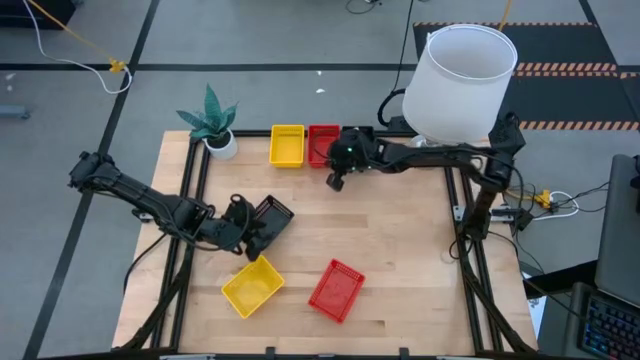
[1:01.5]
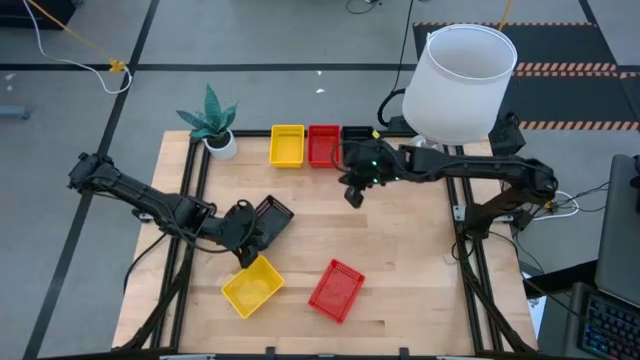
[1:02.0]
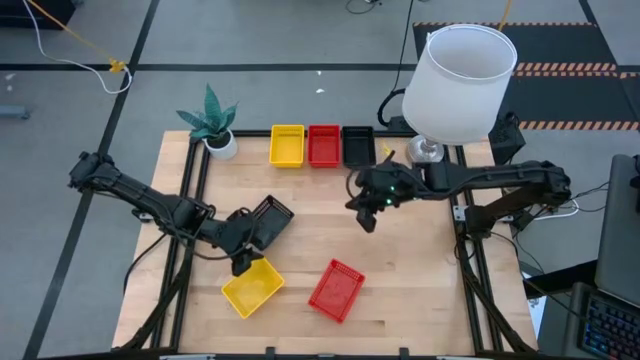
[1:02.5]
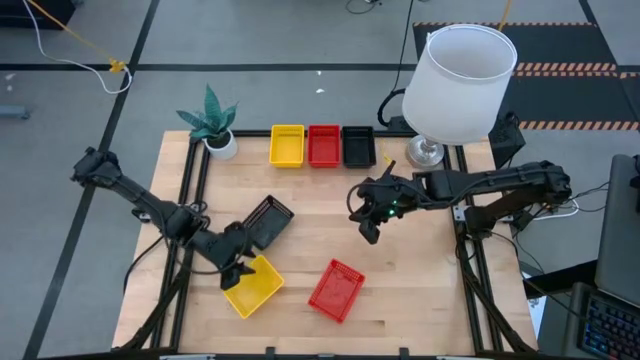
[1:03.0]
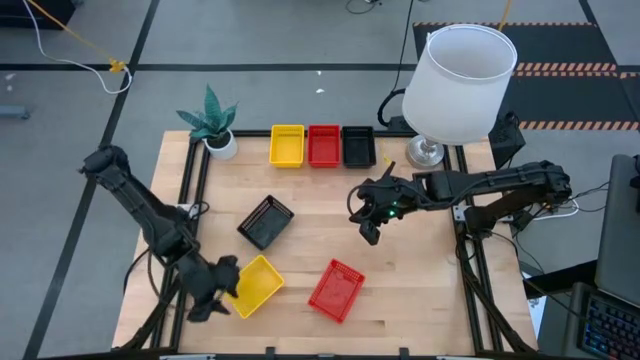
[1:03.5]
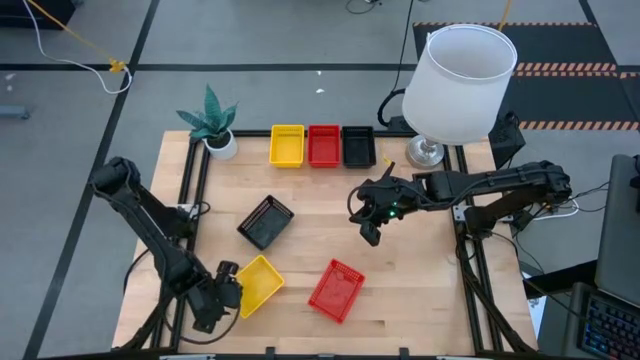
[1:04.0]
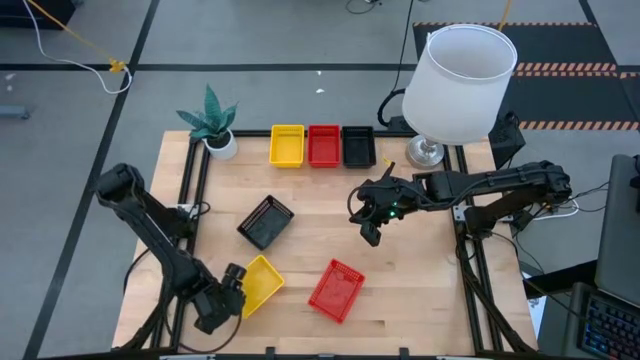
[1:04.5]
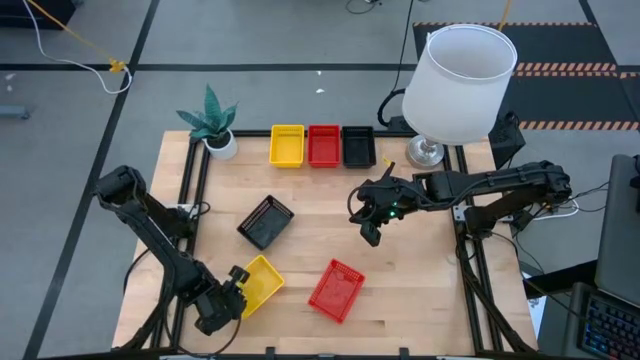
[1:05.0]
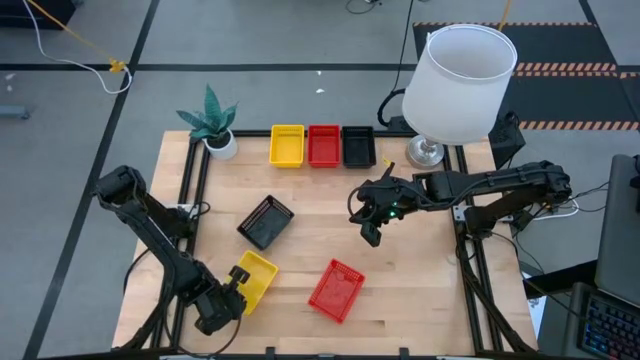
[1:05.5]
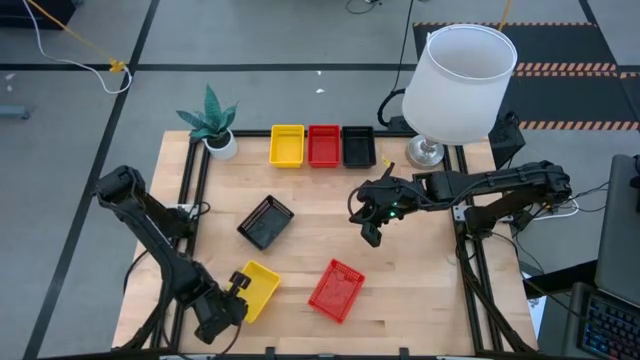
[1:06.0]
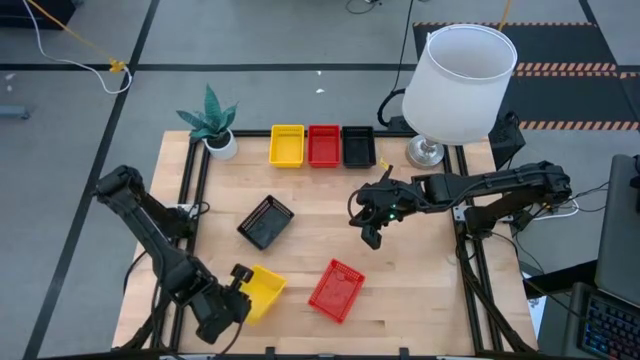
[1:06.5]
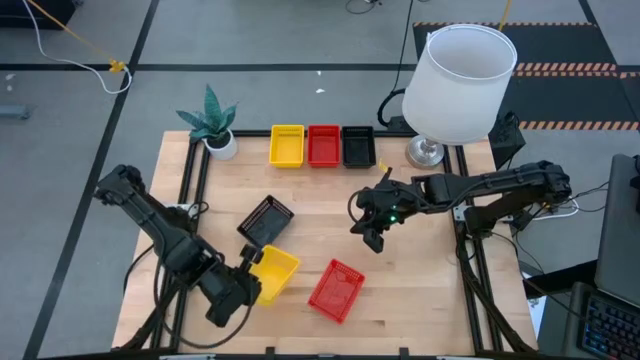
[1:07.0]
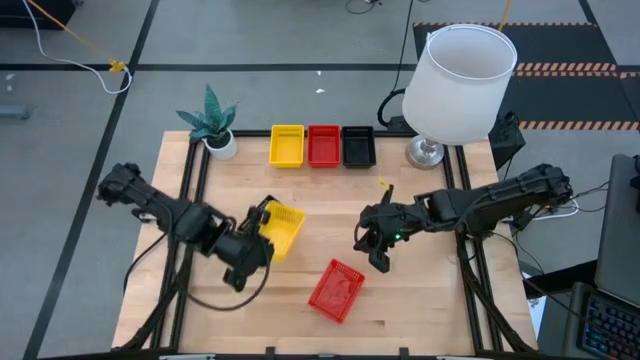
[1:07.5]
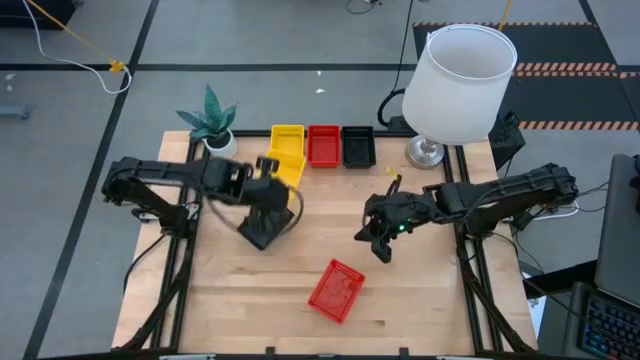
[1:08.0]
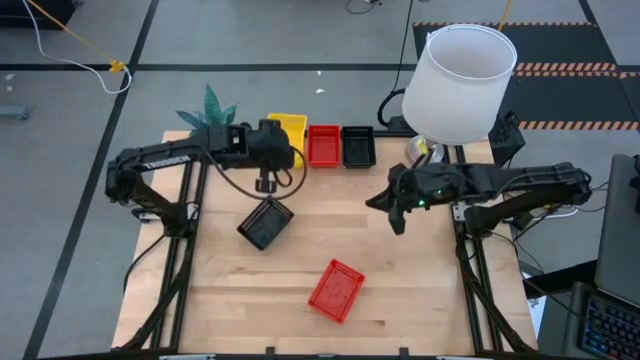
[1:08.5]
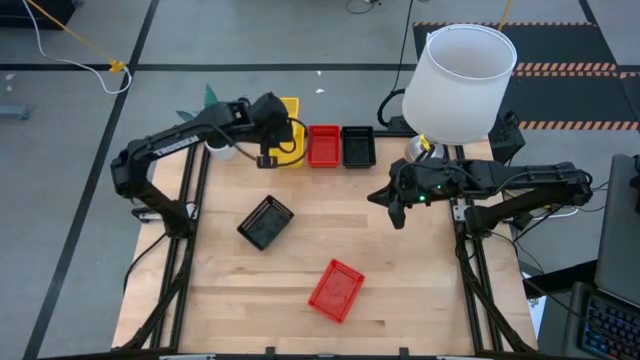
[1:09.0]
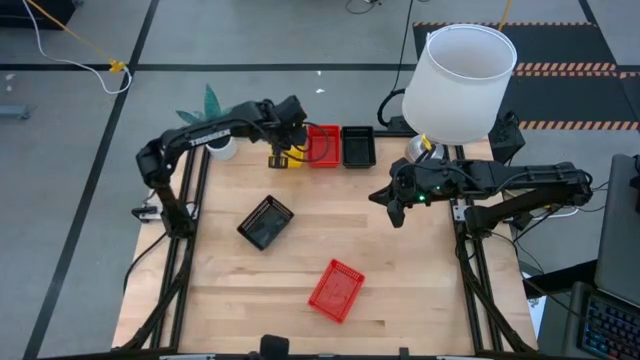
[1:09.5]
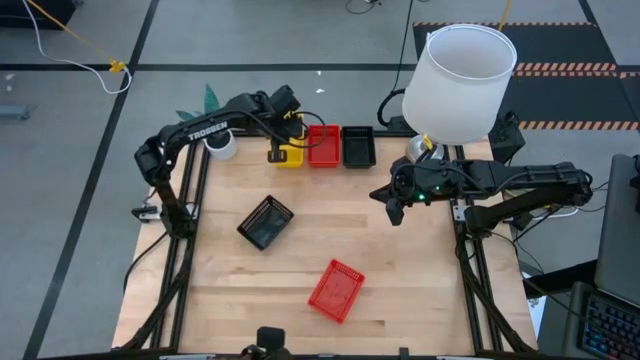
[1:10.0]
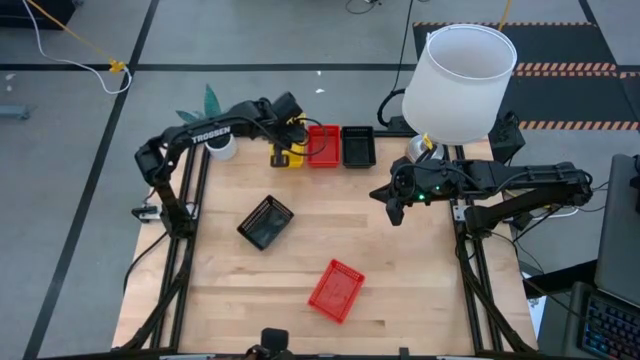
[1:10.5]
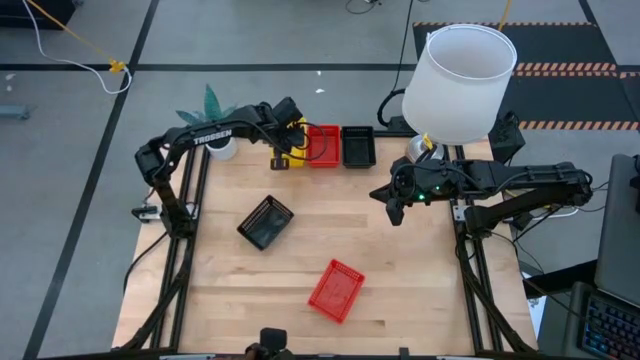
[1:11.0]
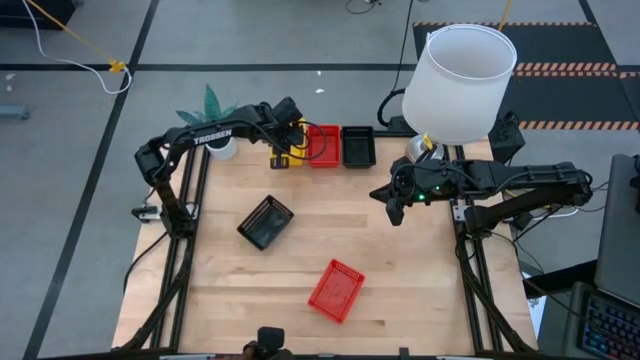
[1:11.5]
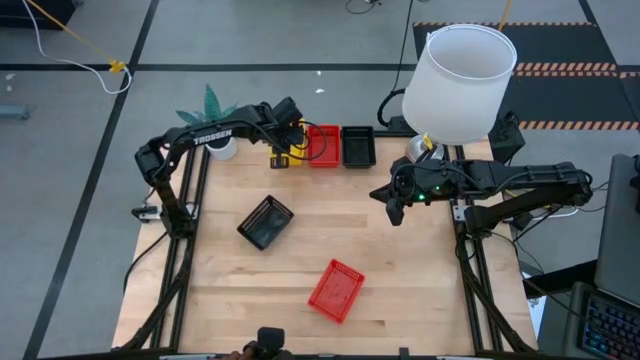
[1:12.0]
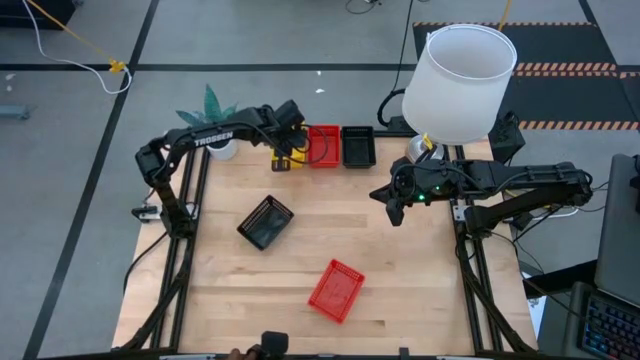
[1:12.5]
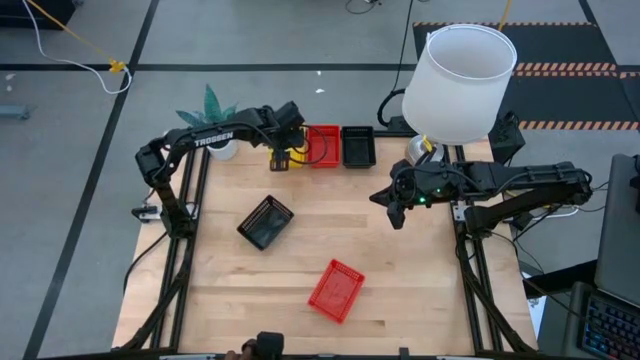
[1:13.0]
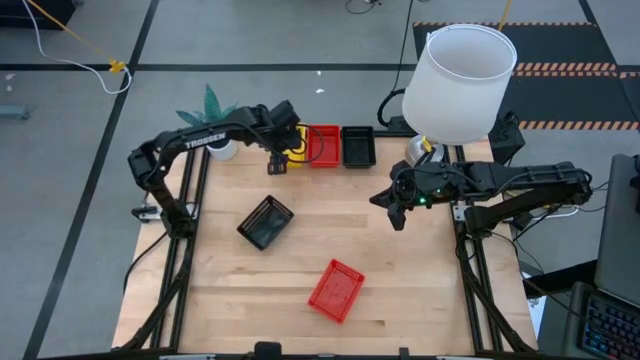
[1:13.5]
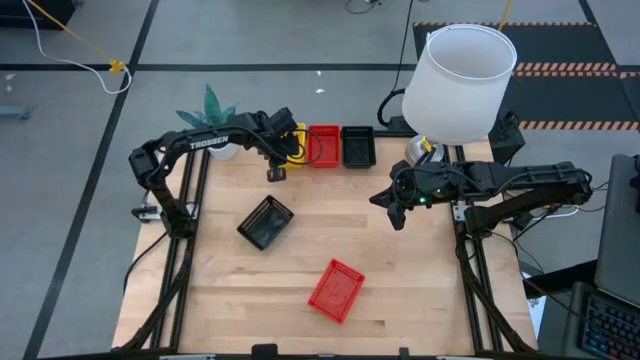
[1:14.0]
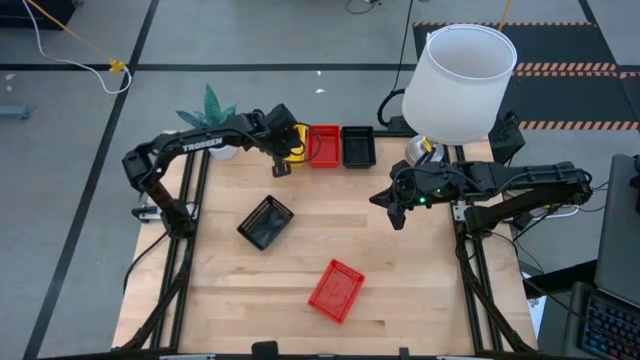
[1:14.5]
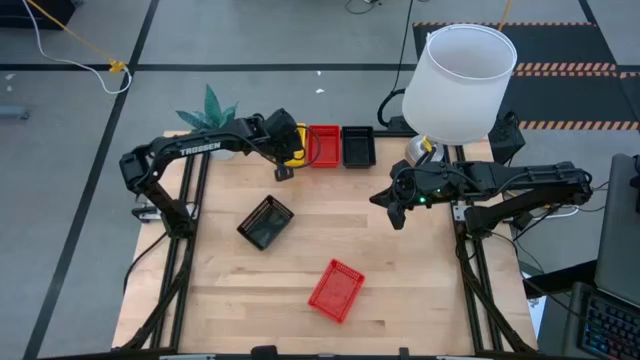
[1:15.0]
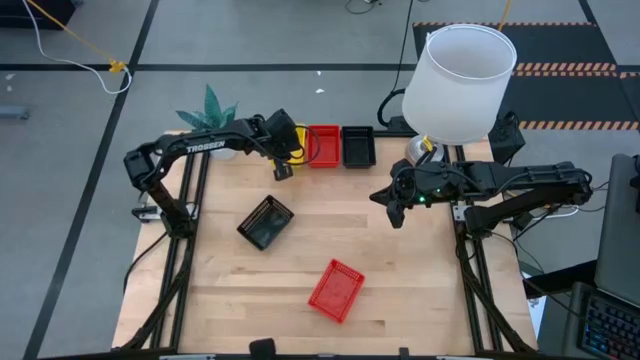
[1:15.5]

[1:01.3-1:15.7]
Stack the bottom yellow basket on the top yellow basket
